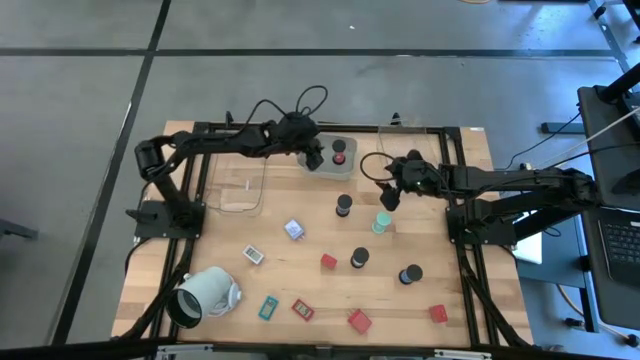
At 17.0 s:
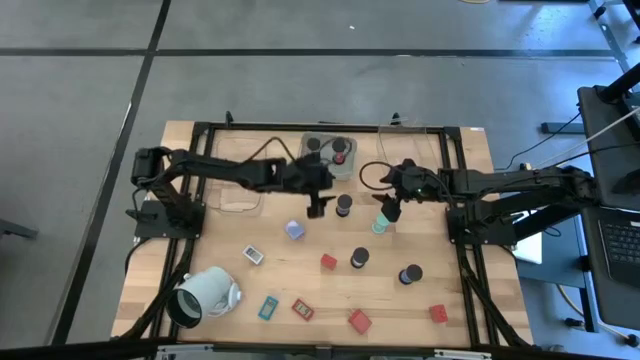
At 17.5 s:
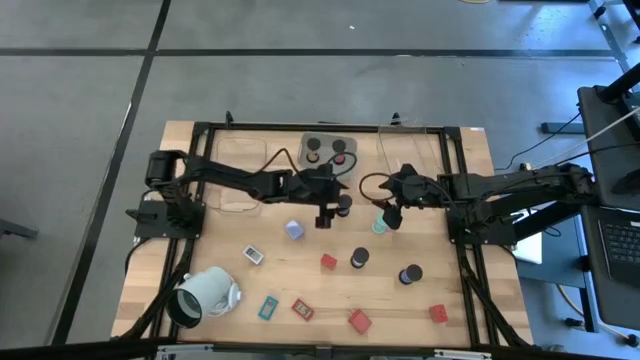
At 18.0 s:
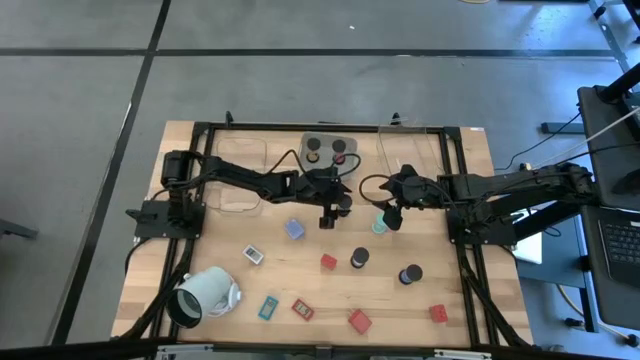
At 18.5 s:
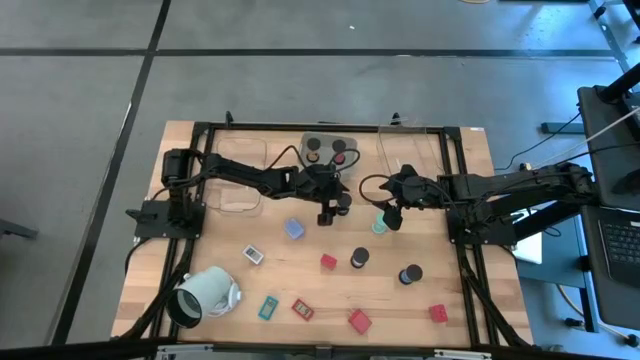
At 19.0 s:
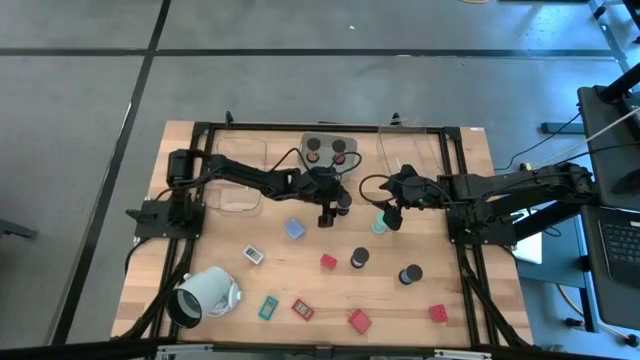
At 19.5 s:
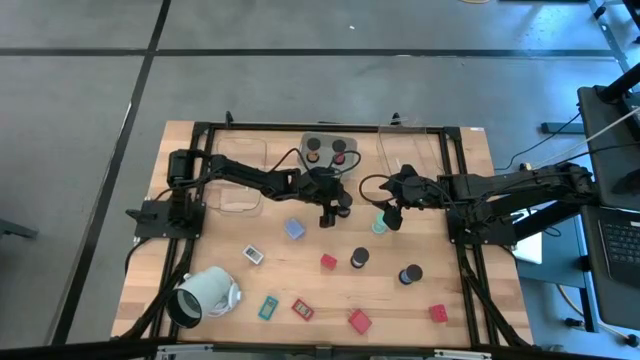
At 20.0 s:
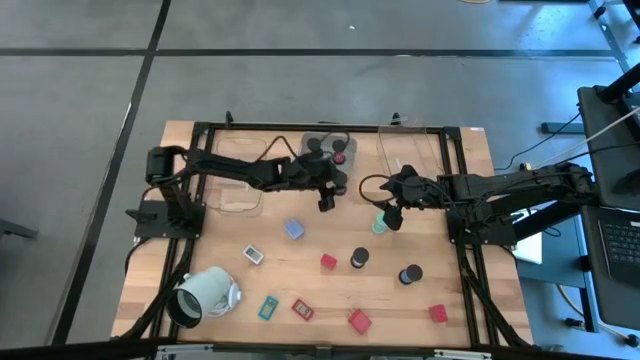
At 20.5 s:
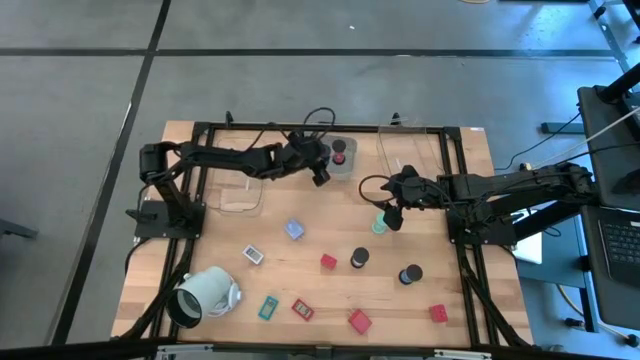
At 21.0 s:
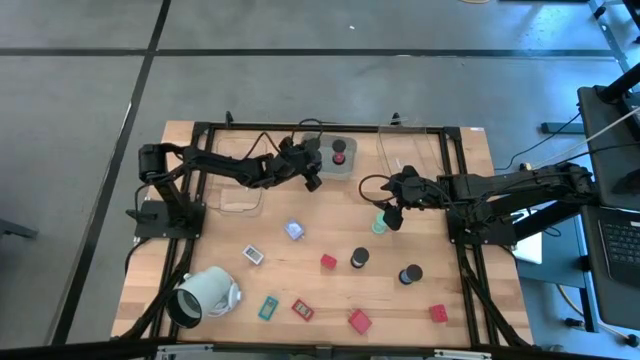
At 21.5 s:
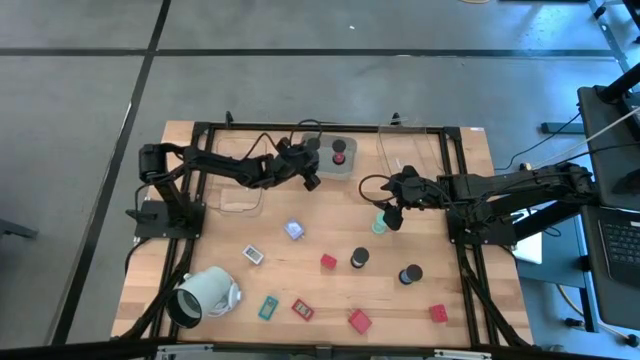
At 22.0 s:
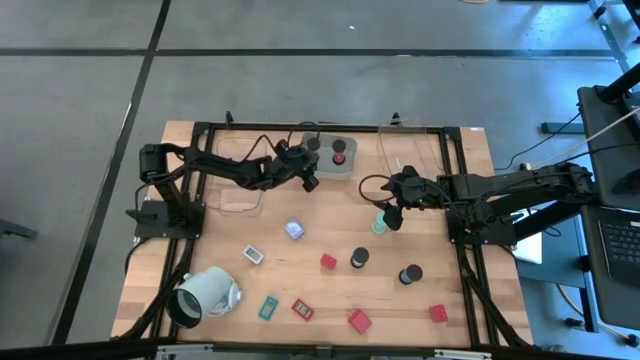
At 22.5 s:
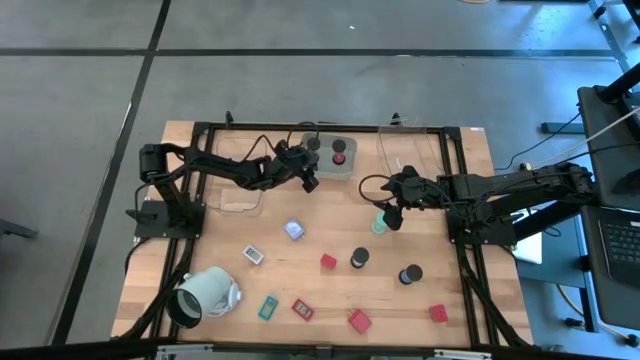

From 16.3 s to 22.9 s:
Task: Pick & Place Office items
Put the left blue hourglass timer into the gray bin

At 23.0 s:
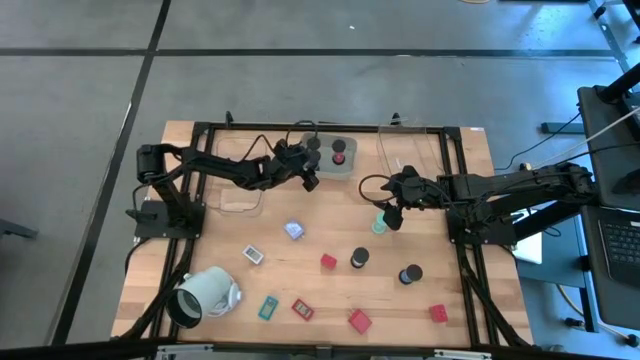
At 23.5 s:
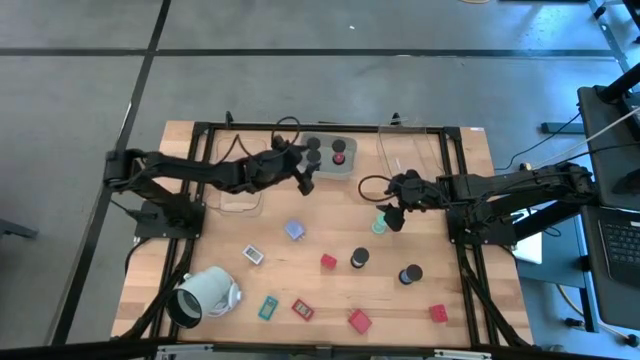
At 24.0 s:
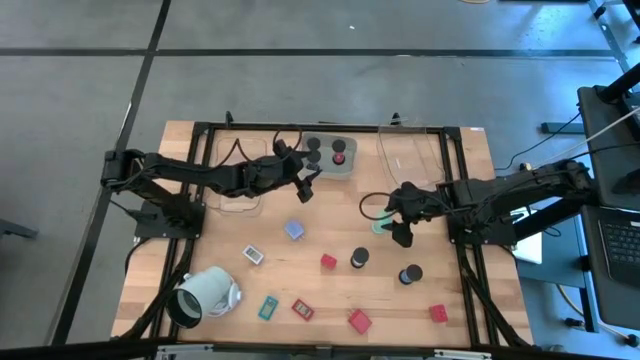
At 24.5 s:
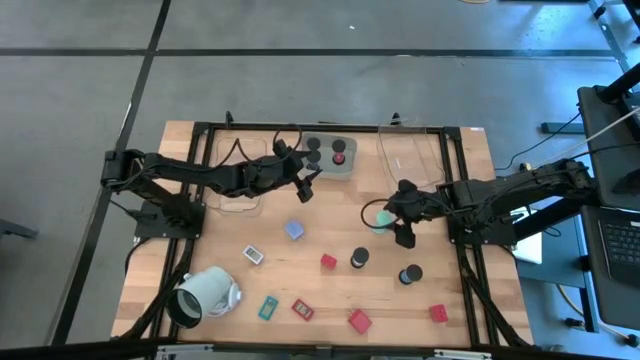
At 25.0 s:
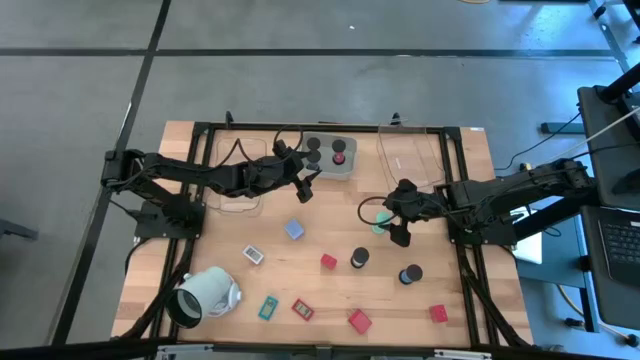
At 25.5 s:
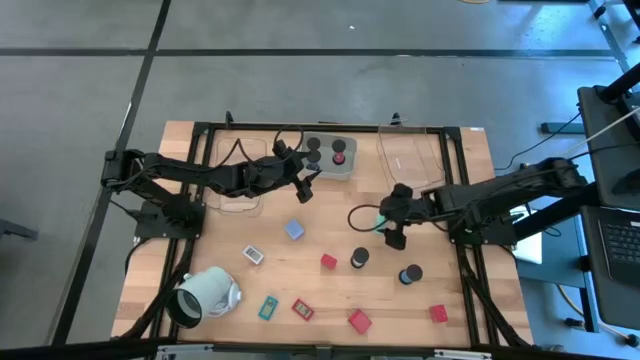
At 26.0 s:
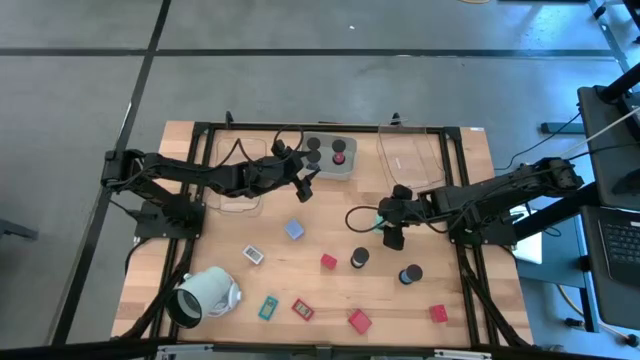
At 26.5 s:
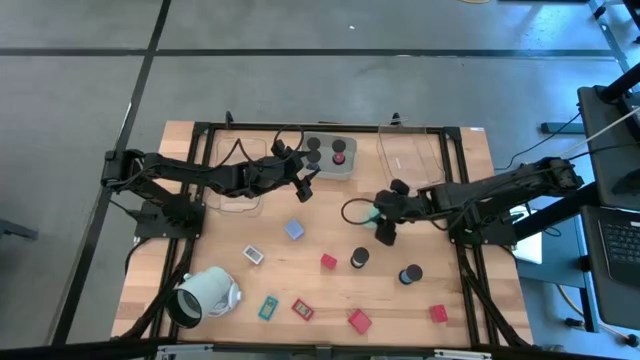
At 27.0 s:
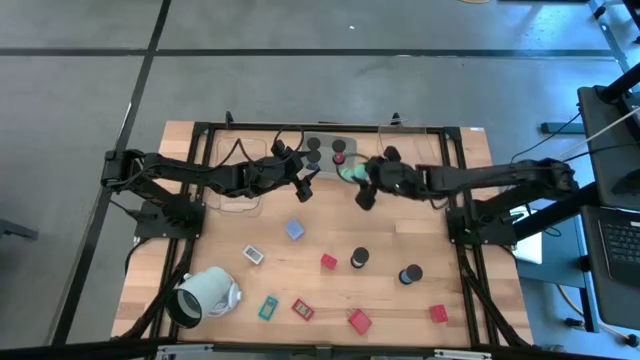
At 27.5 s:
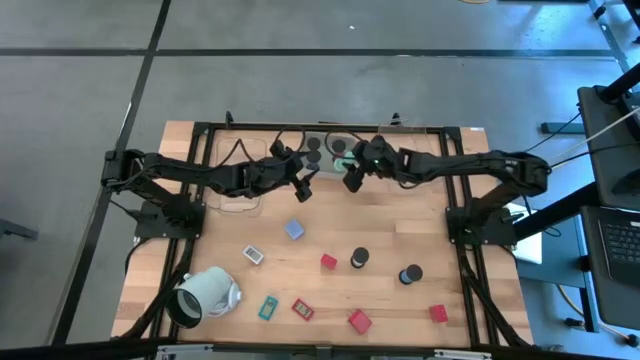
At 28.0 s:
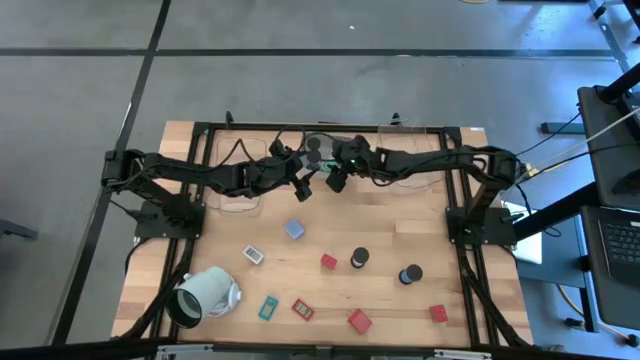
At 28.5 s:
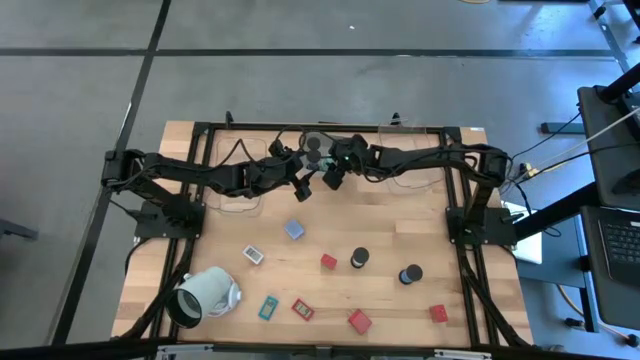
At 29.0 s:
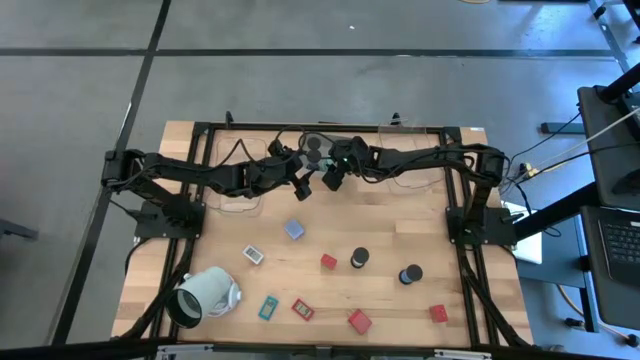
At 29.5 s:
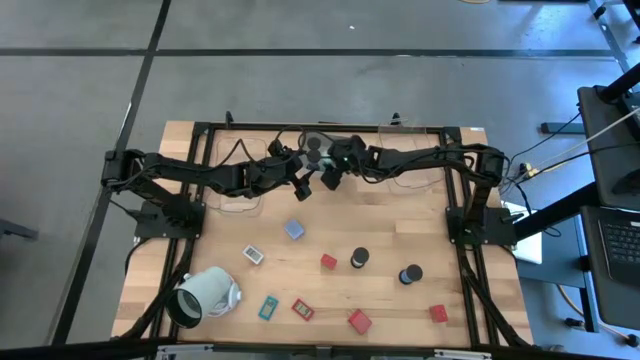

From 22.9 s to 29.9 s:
Put the blue and green hourglass timer into the gray bin

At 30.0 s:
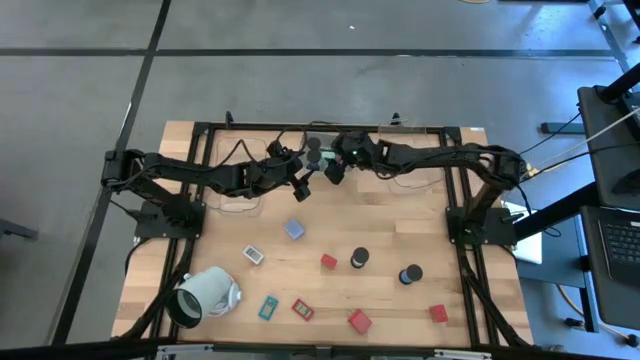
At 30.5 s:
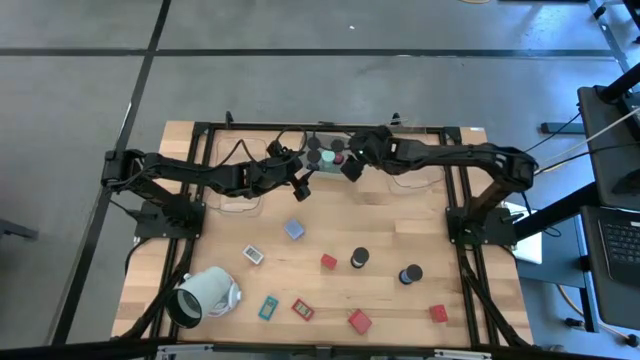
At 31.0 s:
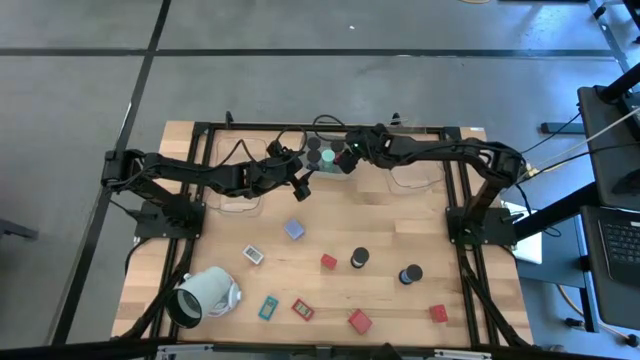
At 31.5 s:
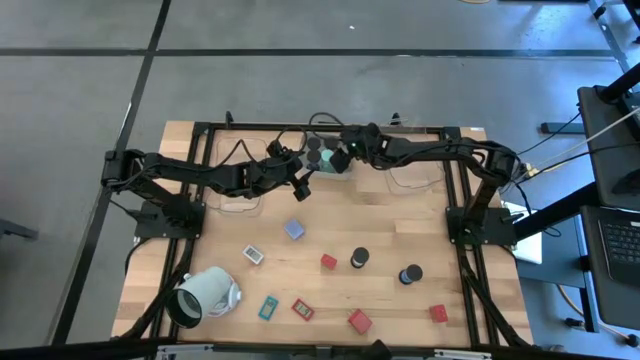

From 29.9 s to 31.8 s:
Adjust the red hourglass timer in the gray bin

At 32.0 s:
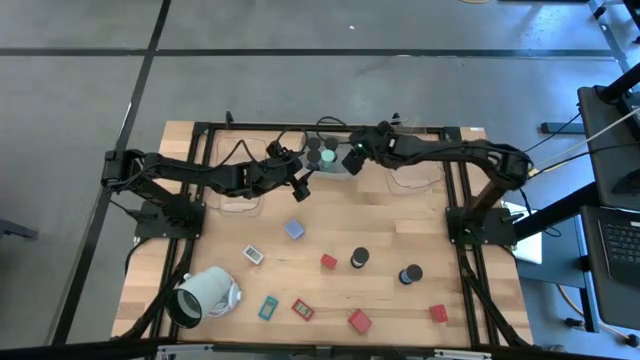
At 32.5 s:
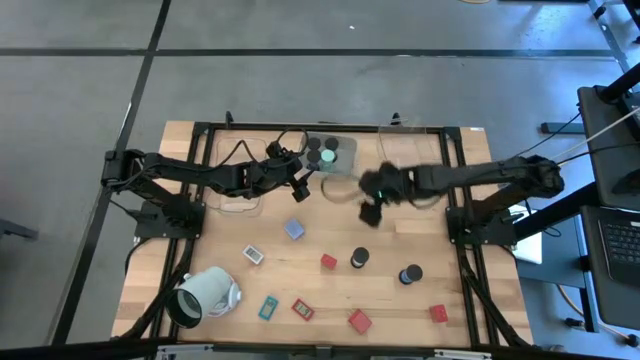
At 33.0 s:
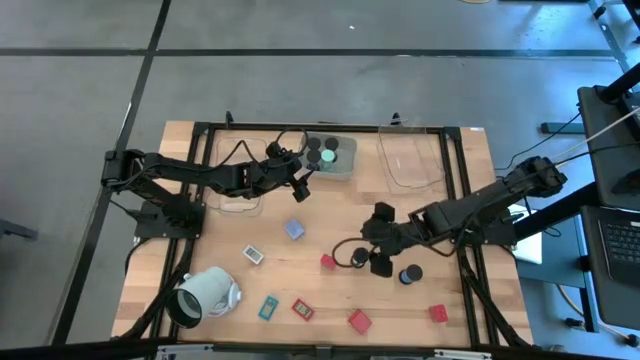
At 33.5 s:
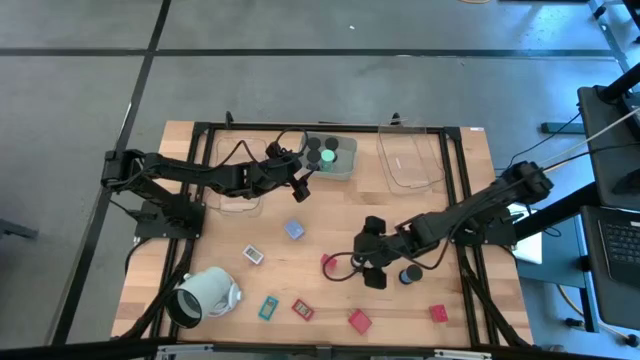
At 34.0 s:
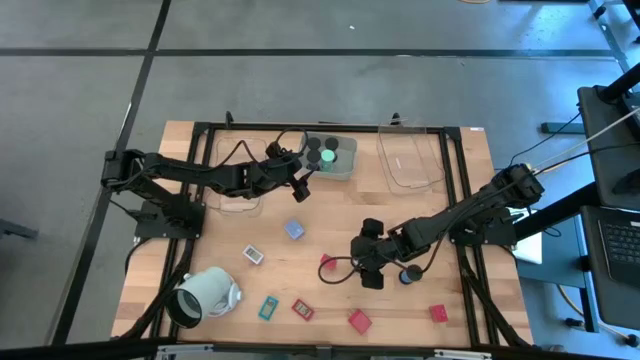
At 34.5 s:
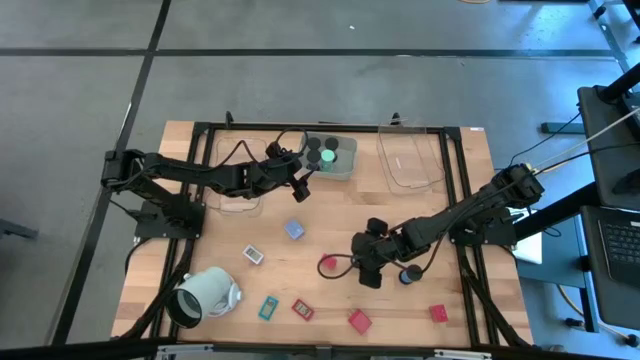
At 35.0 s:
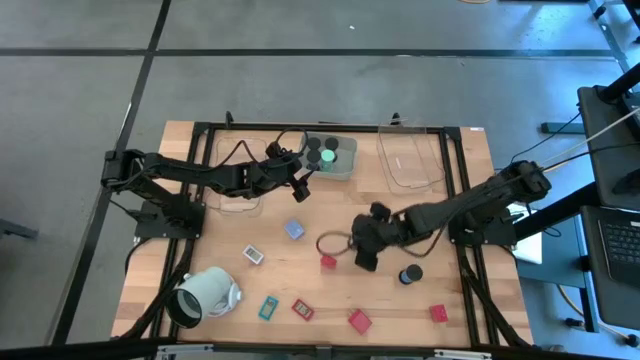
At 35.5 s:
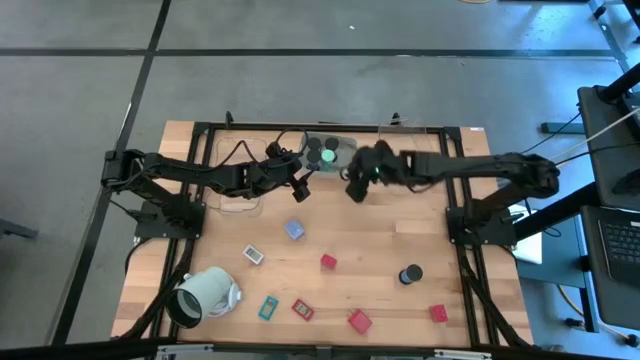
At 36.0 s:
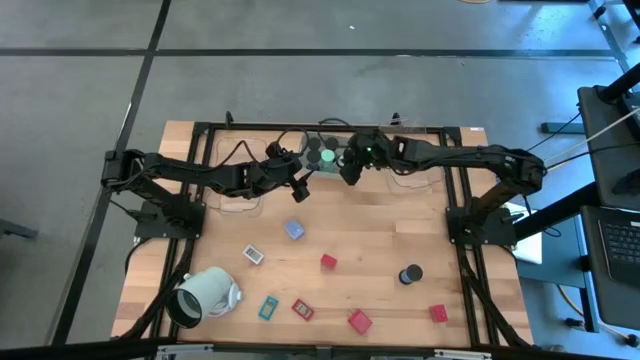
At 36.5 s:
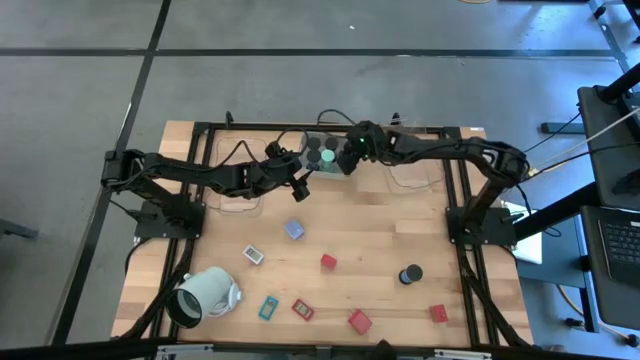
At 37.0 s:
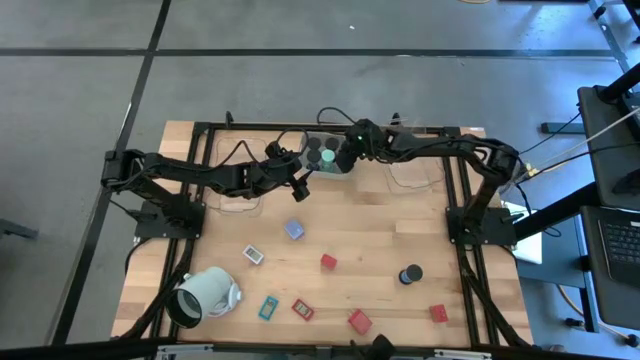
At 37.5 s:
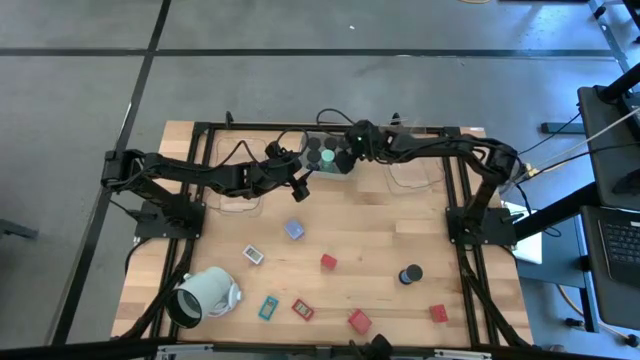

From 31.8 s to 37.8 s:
Put the white hourglass timer into the gray bin

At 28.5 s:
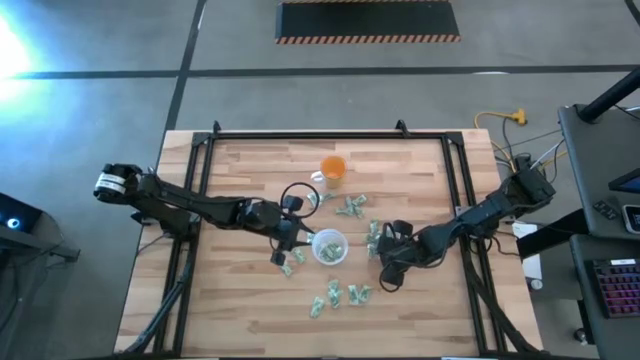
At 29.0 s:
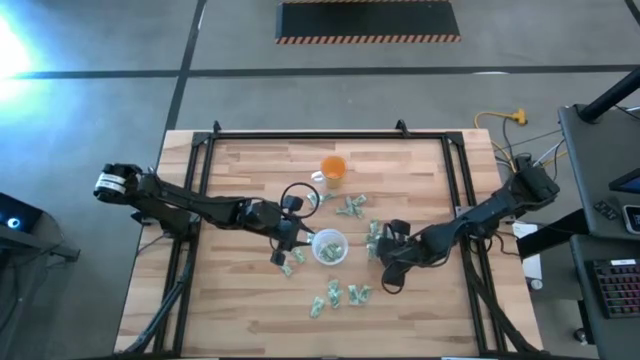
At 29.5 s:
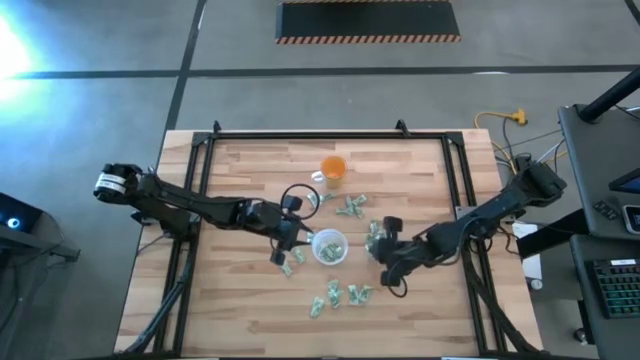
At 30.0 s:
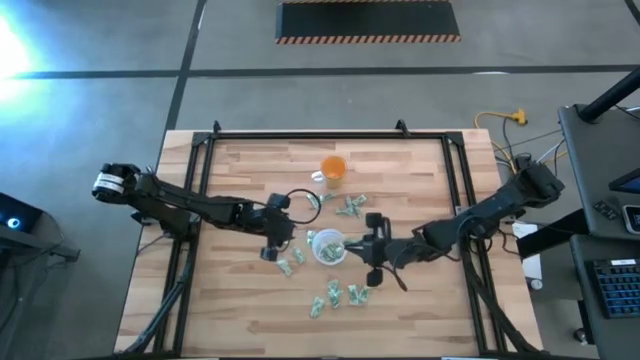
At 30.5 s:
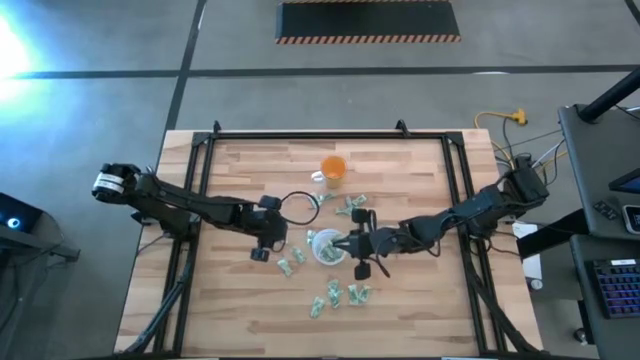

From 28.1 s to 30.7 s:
Task: Pick and place Stevia / Truvia into bins
Put the green stevia packet into the transparent container
